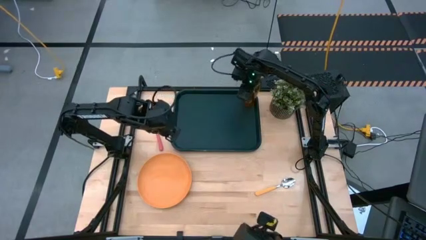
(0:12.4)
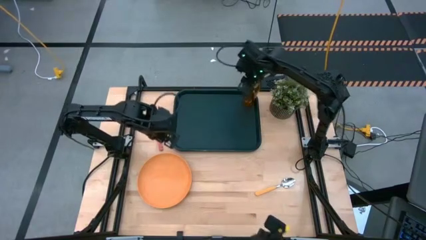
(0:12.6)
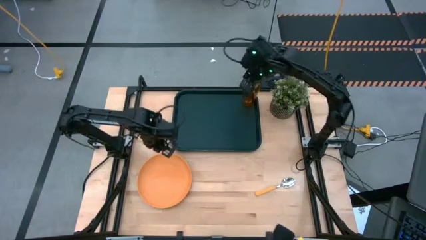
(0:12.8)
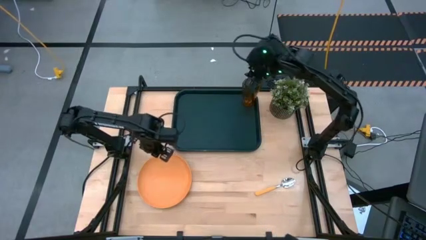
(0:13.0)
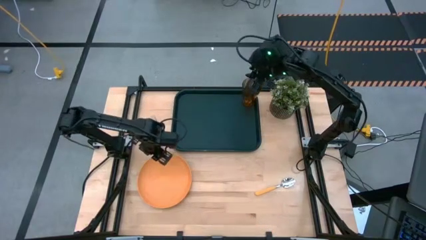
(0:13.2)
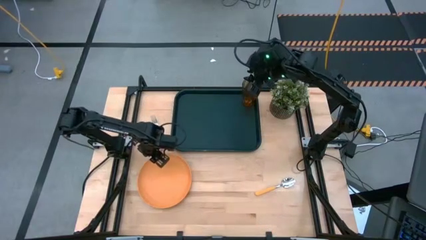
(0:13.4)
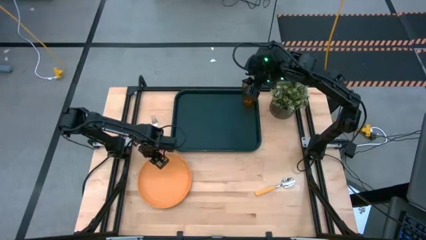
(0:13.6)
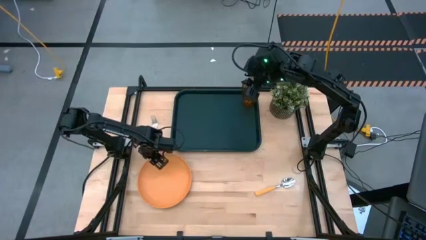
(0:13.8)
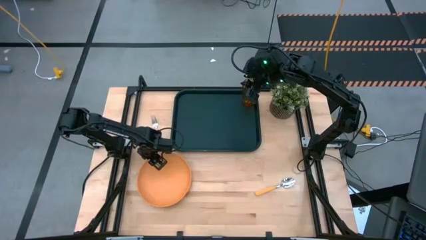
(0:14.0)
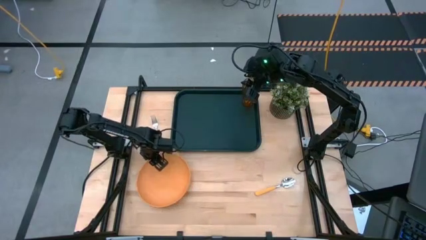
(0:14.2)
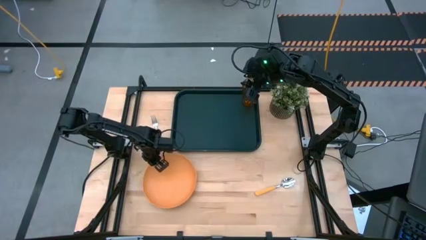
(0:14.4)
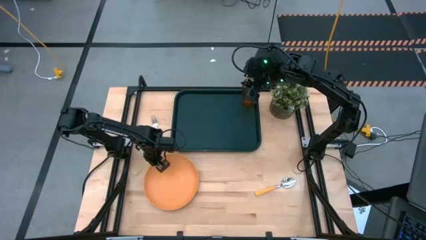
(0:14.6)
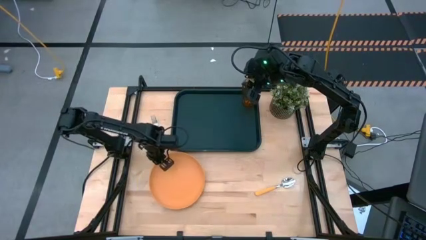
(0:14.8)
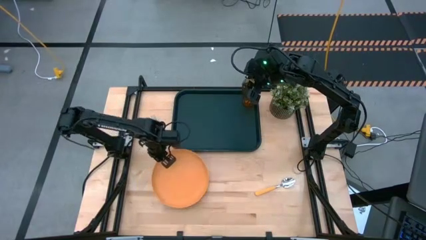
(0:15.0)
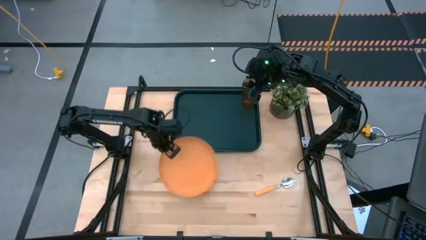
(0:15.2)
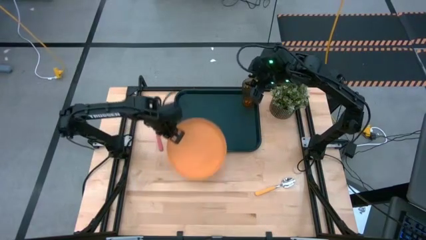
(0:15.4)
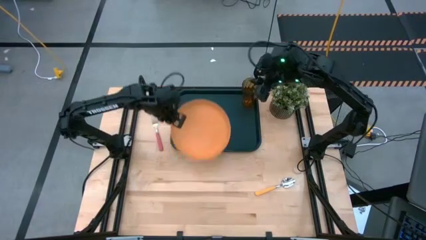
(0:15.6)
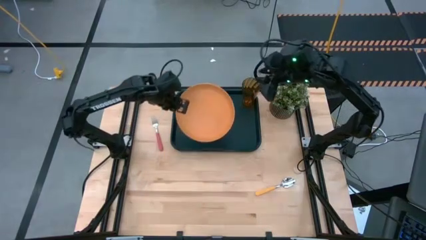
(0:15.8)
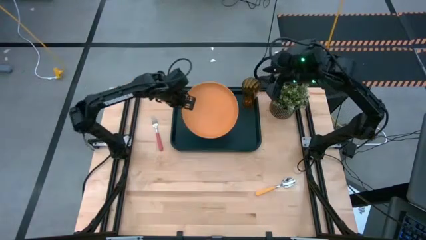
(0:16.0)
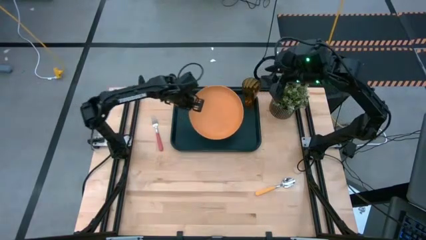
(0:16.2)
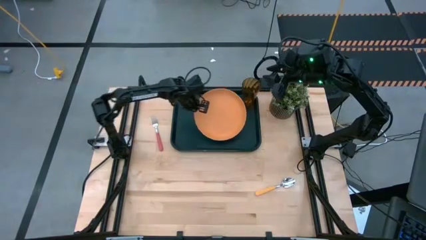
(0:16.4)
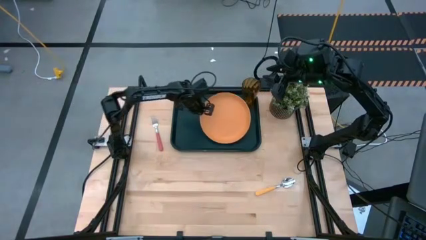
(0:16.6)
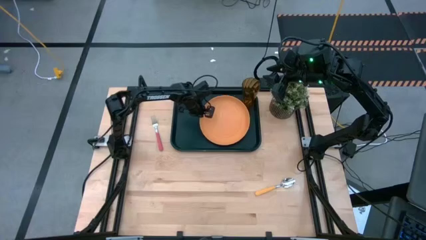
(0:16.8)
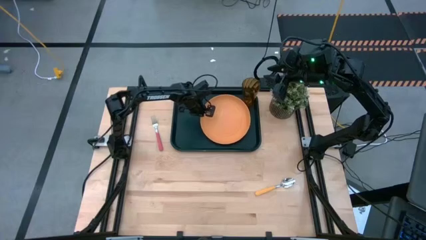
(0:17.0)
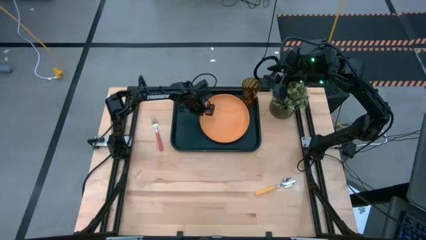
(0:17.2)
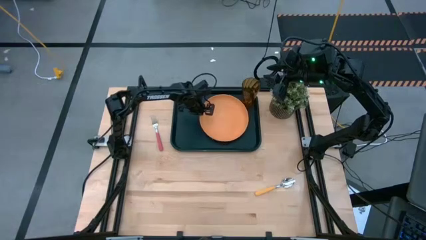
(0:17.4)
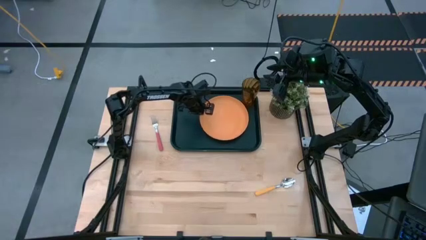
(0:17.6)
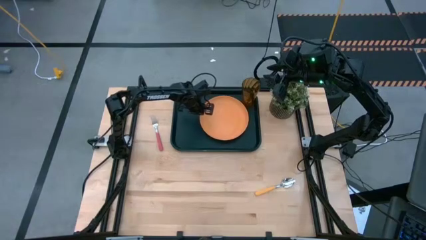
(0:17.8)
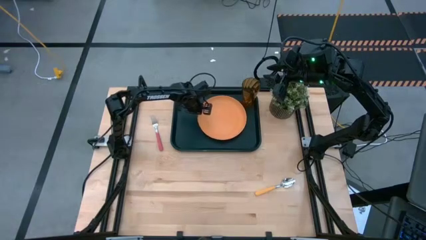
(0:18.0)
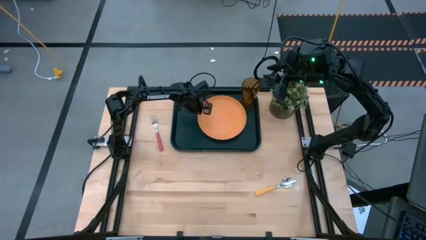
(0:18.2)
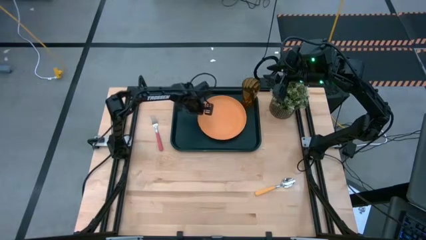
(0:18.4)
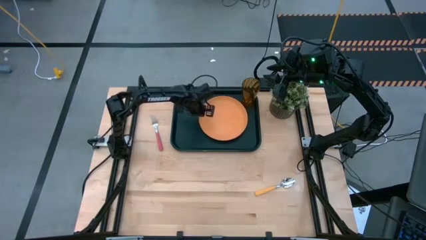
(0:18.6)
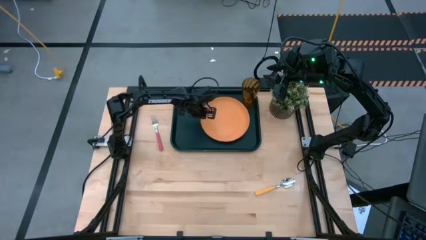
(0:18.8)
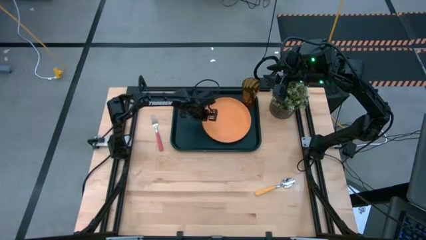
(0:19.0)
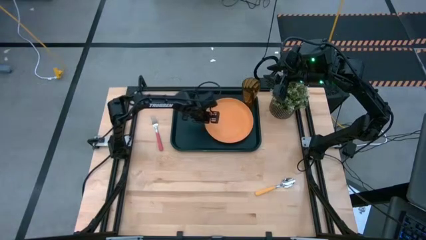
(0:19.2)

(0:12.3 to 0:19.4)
Task: Pick and place plate/cup/fork/spoon on tray
Put the orange plate on the left of the black tray

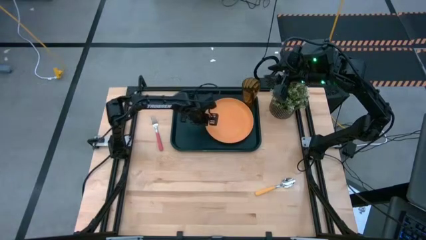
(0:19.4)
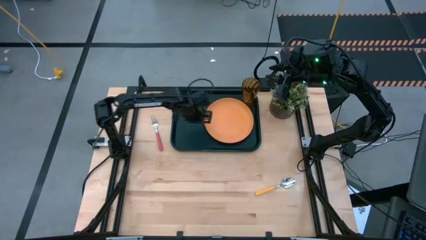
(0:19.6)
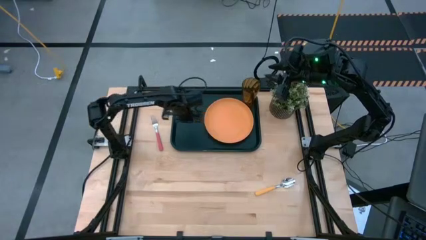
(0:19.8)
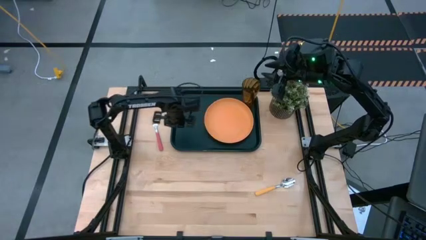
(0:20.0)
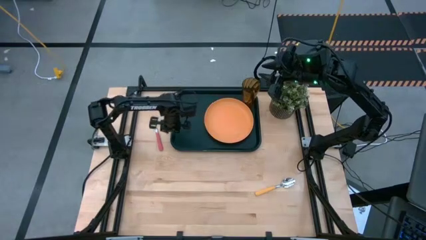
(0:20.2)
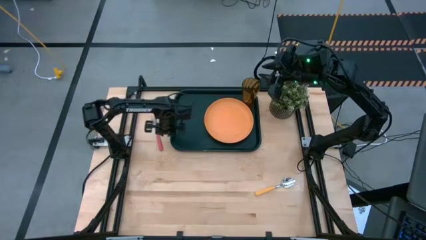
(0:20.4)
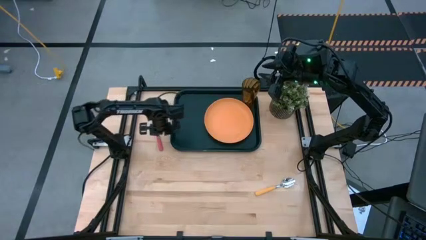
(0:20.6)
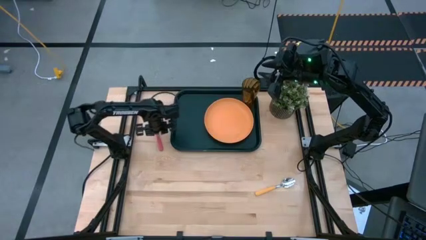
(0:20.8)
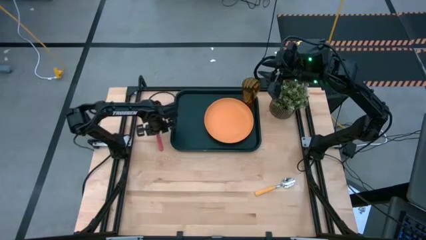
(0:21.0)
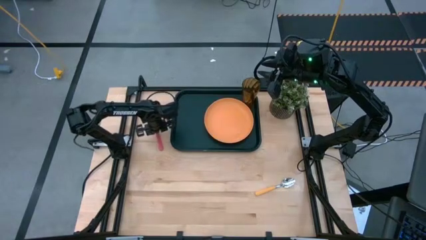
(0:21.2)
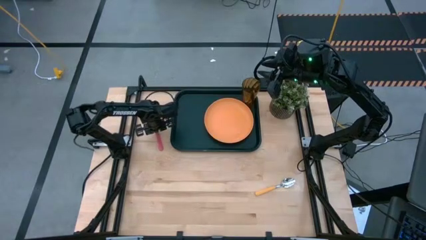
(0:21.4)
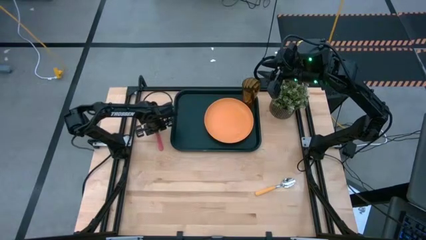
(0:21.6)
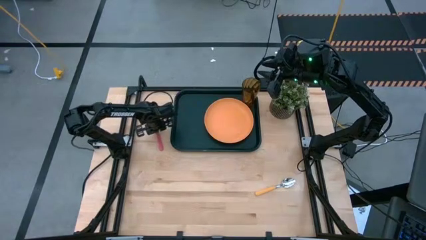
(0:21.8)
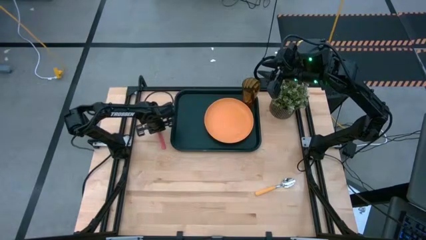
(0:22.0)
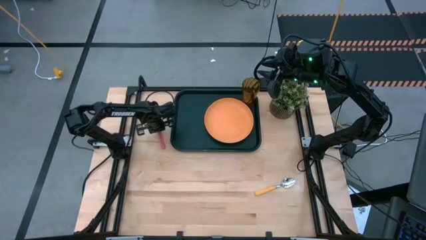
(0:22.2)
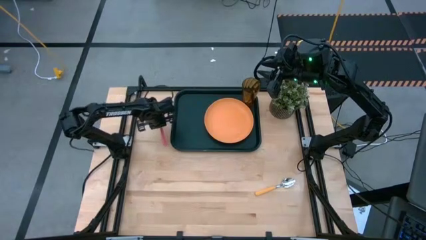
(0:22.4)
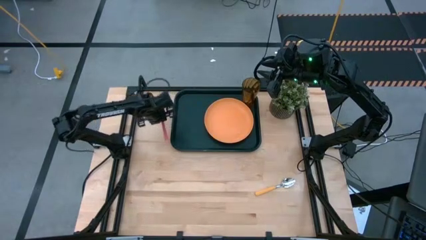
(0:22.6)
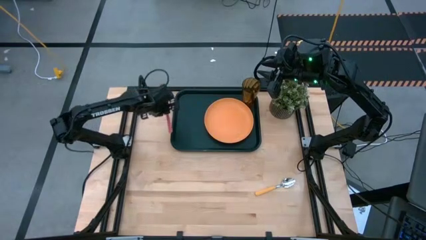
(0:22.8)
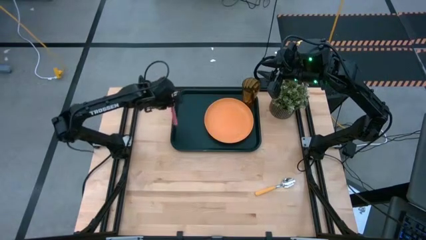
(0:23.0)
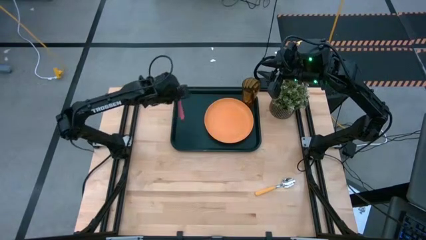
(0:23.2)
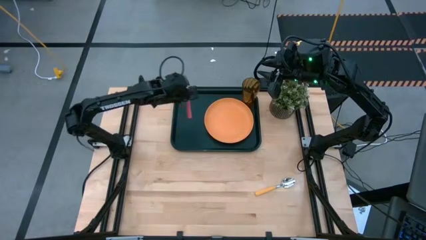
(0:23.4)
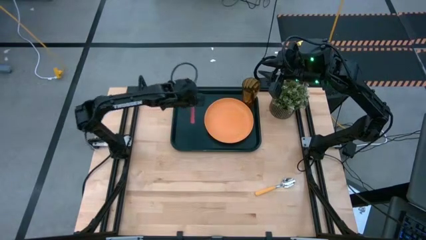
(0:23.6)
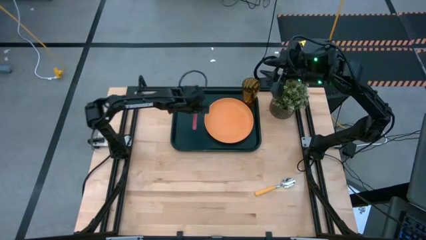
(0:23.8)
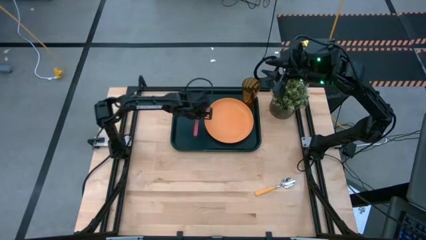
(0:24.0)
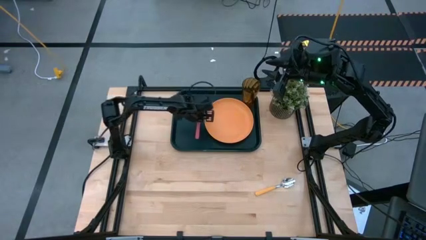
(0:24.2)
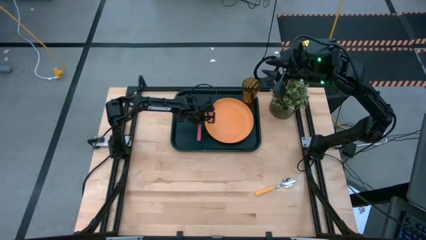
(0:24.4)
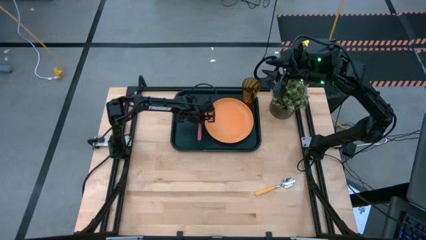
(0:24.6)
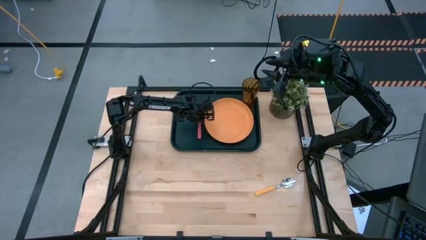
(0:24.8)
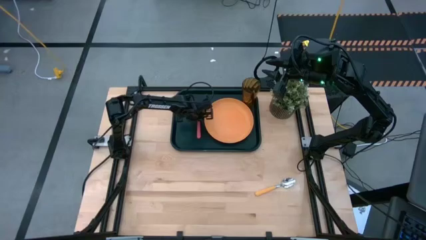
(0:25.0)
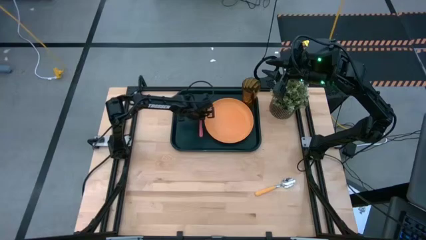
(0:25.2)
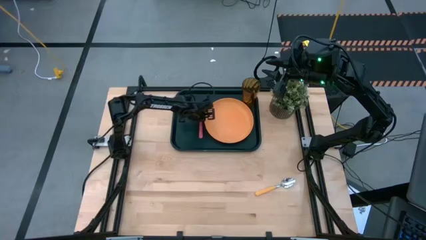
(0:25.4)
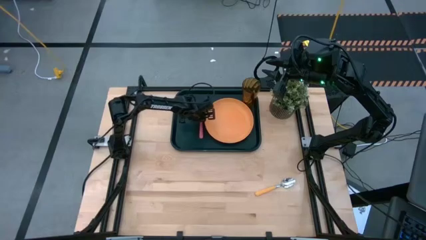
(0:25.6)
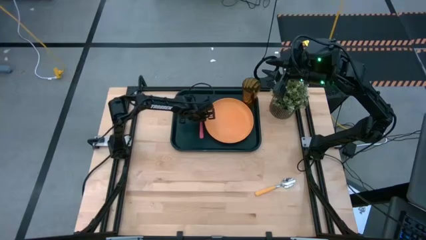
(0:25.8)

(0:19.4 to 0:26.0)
Put the pink fork to the left of the orange plate on the black tray

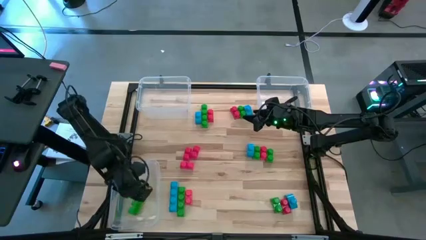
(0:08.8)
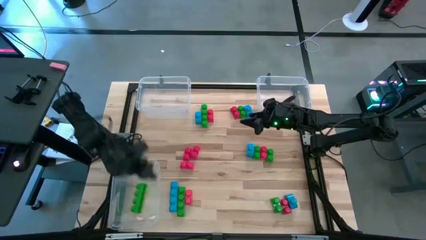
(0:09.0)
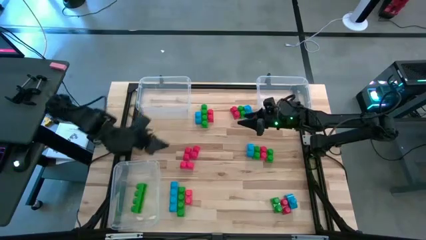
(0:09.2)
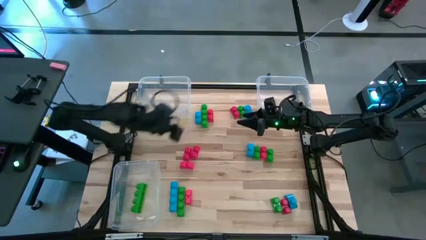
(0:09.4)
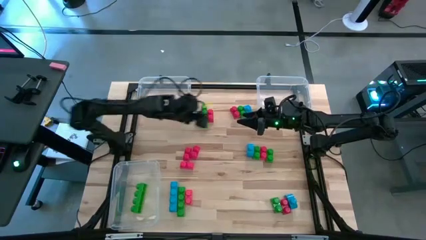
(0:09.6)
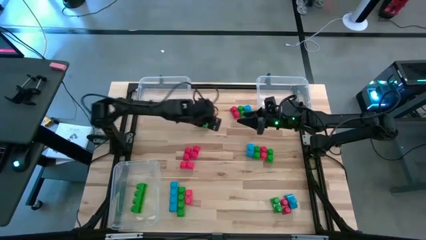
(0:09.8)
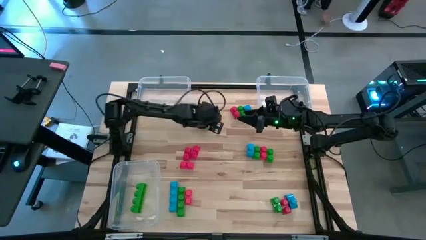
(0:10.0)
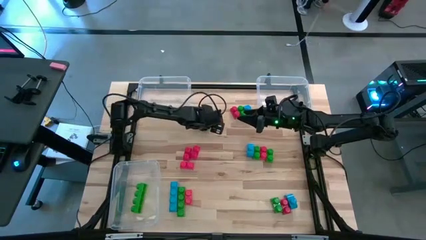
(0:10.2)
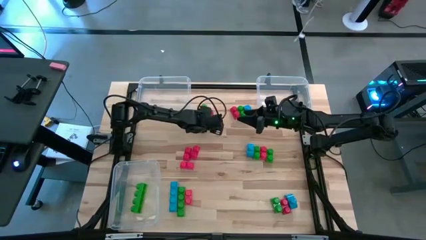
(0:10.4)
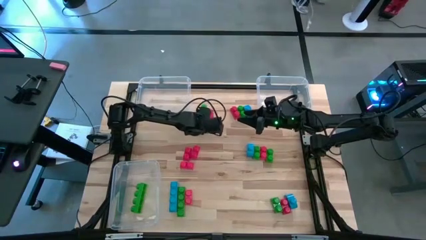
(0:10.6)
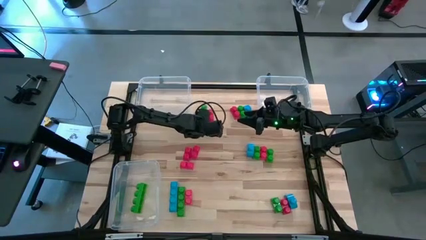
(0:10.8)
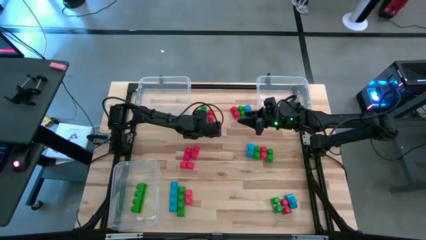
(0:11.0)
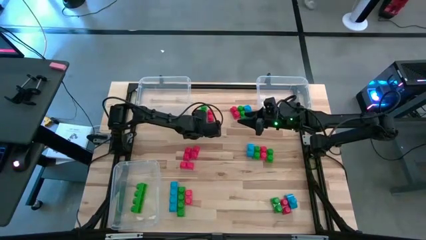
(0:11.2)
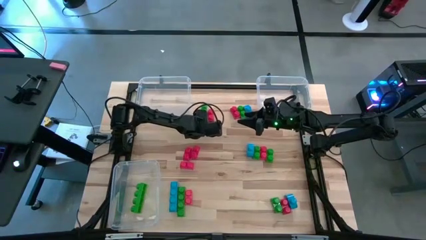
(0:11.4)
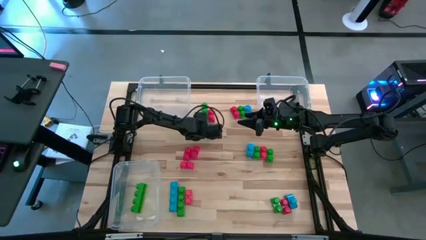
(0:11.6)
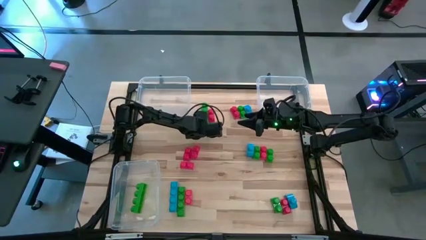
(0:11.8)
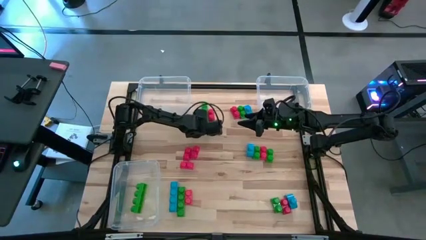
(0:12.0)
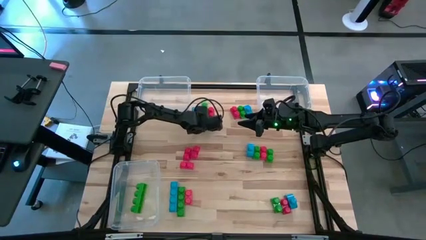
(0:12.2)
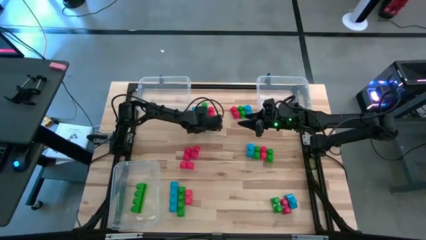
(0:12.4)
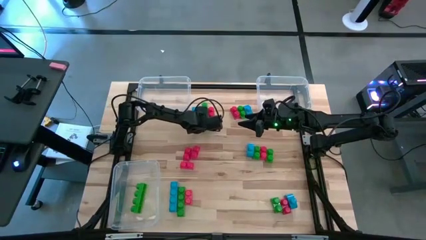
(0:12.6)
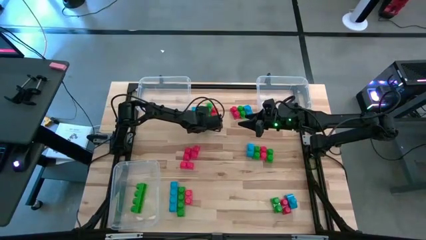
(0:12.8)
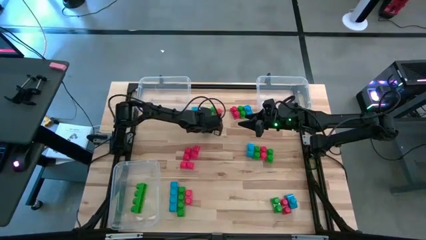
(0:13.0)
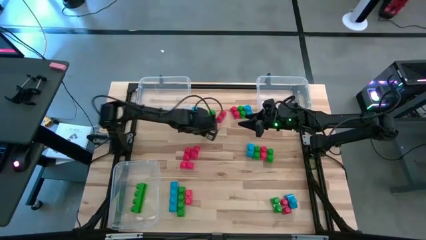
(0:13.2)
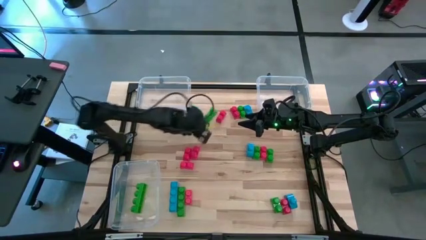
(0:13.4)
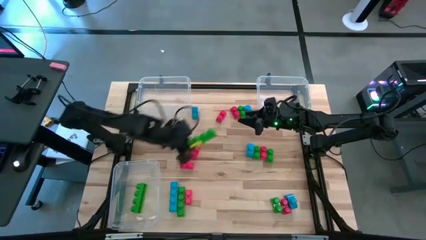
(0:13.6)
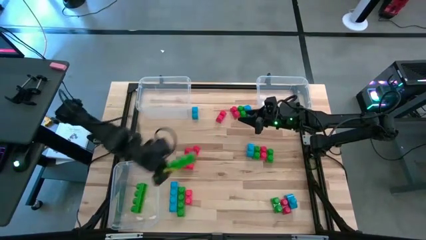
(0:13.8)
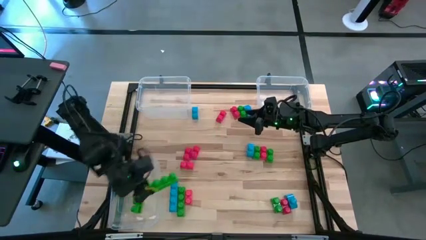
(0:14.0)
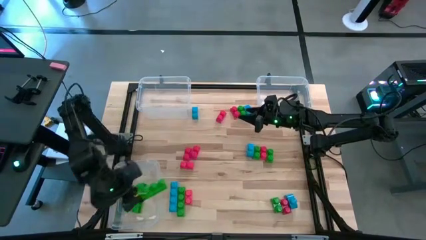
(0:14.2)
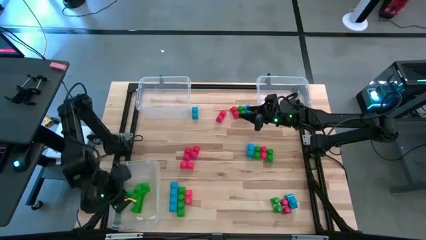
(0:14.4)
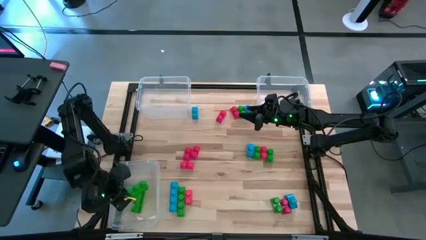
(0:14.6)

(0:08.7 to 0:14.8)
Task: Sort blocks
Put the green game piece into the bottom left transparent bin
